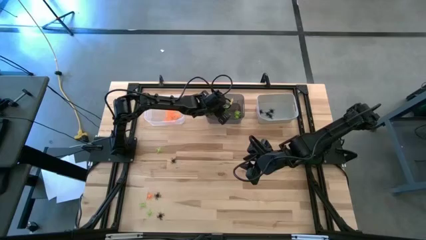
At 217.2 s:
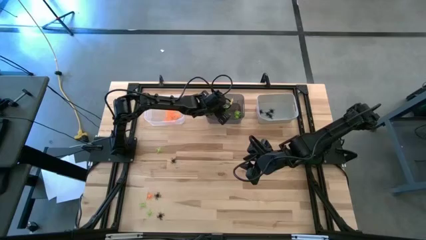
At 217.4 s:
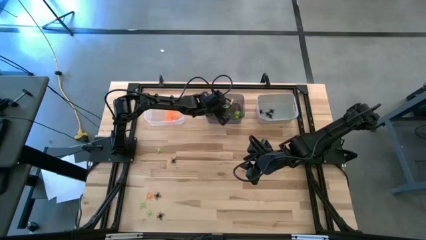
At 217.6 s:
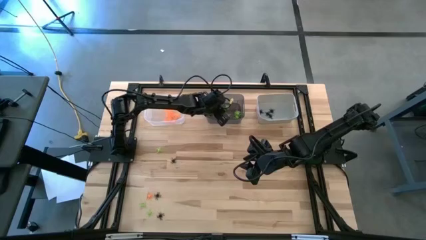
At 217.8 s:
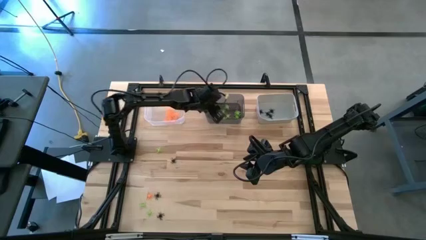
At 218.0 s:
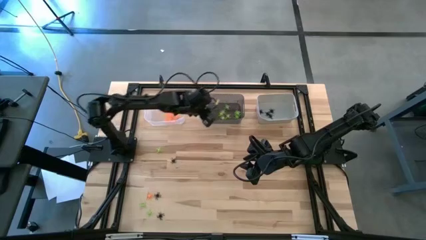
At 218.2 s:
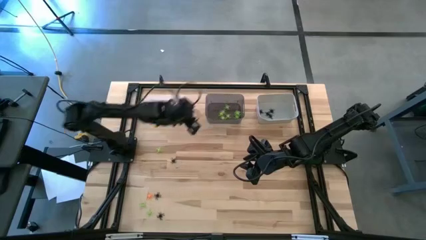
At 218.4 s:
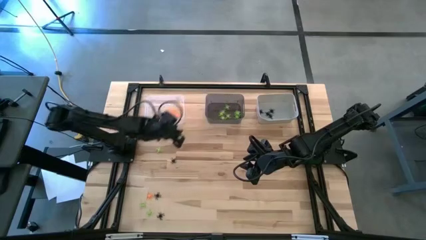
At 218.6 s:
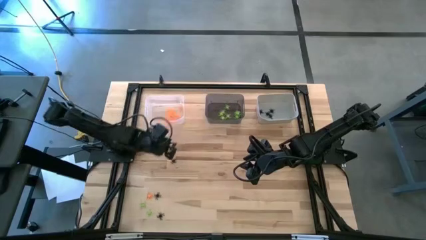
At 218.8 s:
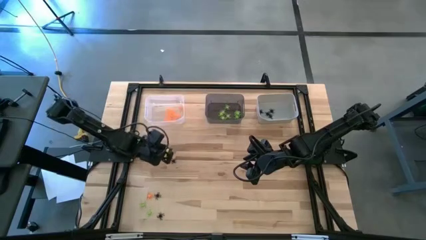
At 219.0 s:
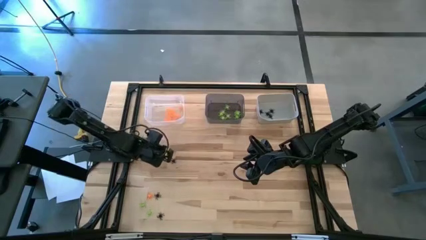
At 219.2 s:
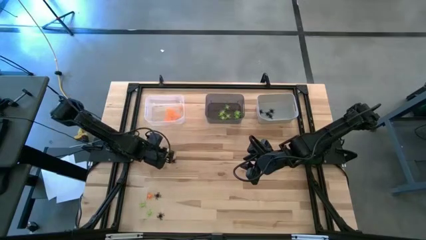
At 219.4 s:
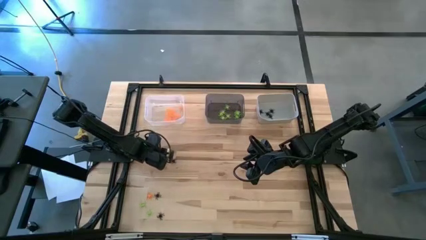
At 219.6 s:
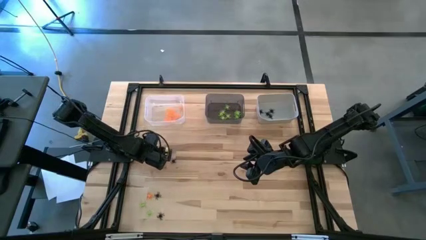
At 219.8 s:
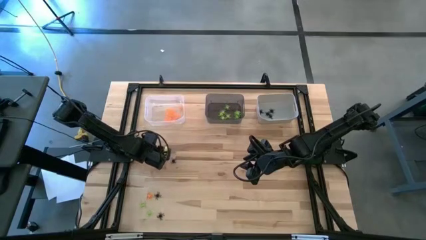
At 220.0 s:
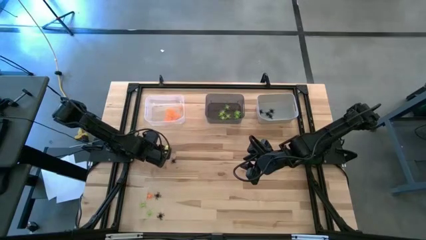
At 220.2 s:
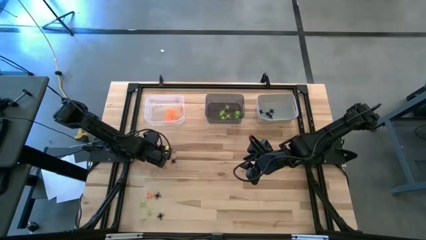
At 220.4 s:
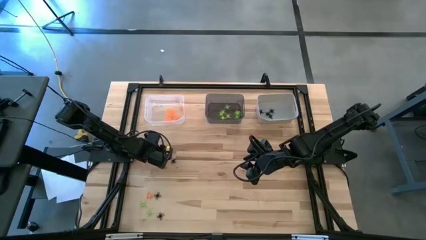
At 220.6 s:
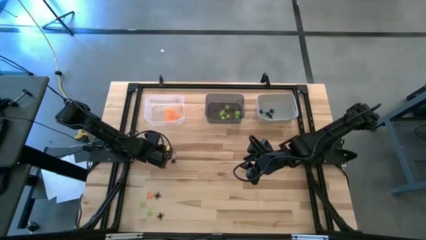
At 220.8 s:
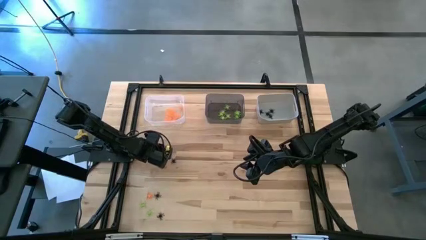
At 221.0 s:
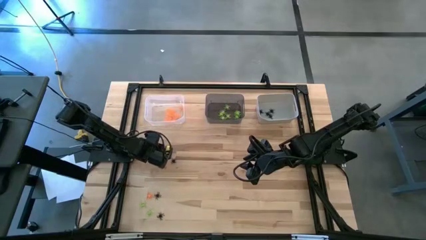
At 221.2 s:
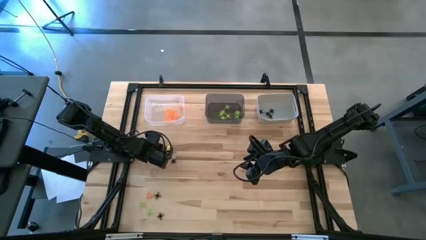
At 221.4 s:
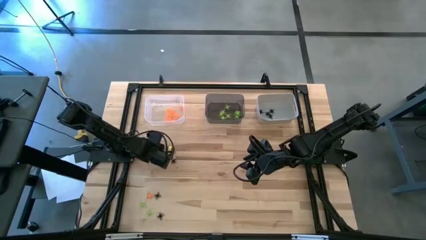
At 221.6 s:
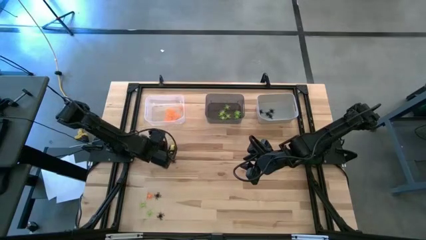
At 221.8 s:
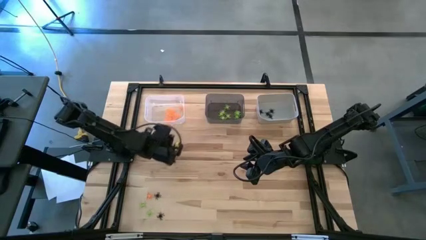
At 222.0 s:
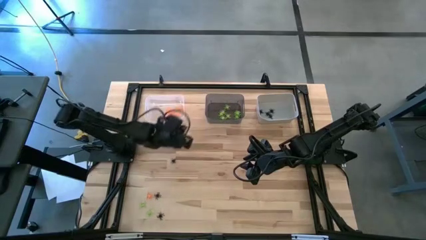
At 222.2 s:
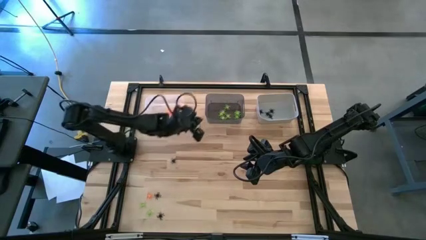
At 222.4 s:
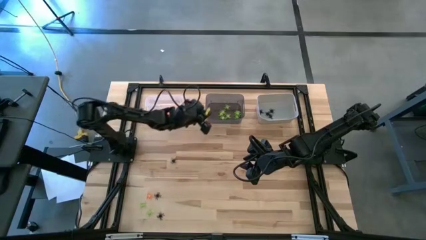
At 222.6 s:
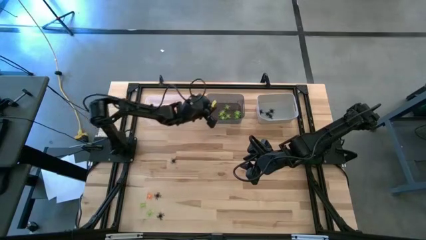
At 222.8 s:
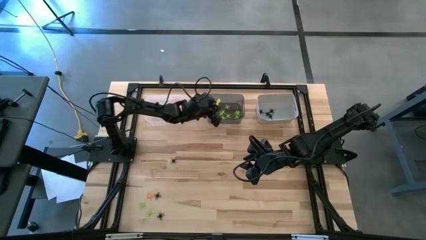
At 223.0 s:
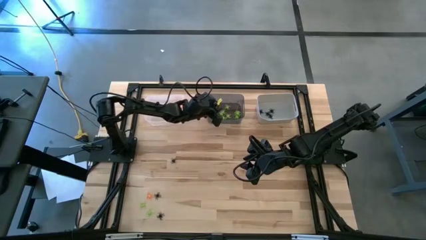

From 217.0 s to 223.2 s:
Task: Sort Halloween decoration
Put the green spider toy into the black transparent bin

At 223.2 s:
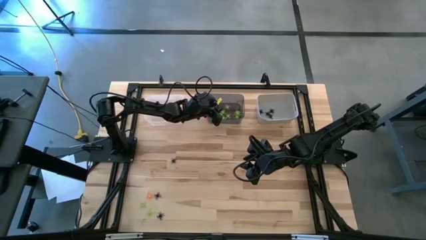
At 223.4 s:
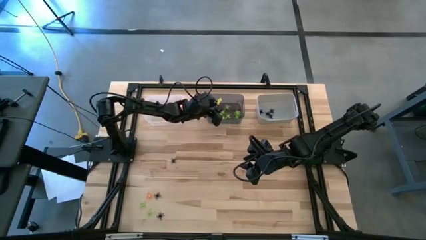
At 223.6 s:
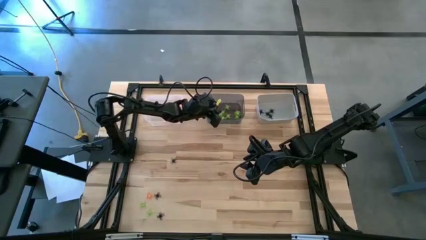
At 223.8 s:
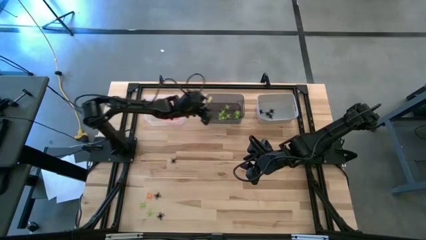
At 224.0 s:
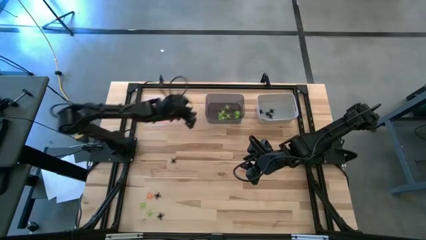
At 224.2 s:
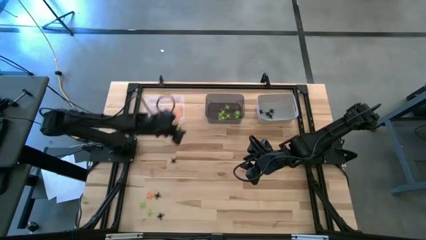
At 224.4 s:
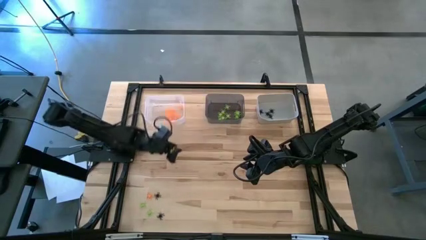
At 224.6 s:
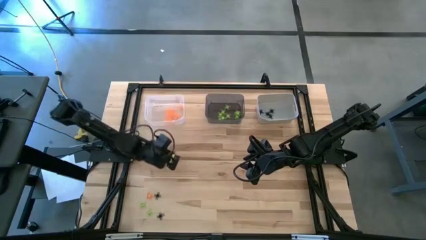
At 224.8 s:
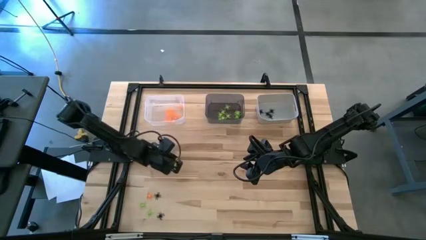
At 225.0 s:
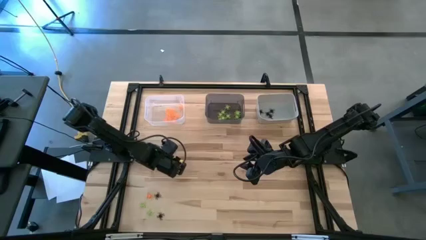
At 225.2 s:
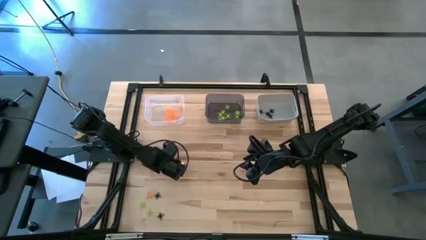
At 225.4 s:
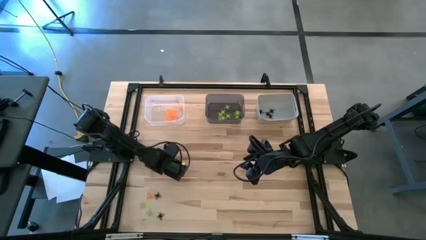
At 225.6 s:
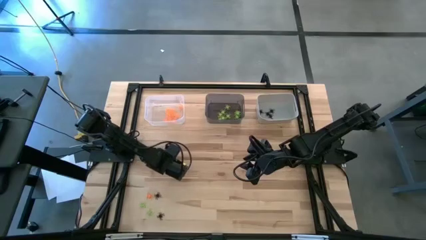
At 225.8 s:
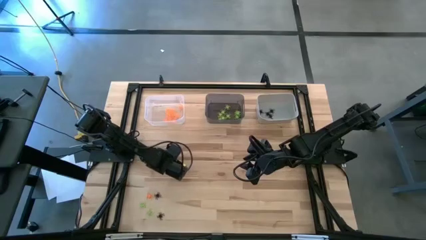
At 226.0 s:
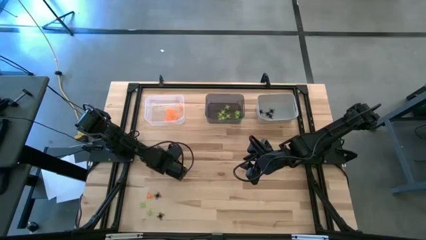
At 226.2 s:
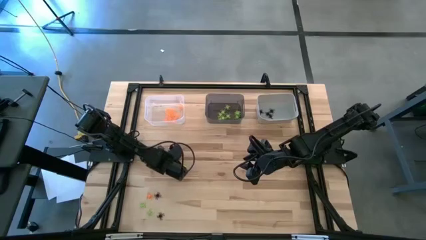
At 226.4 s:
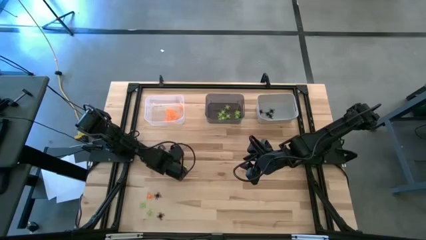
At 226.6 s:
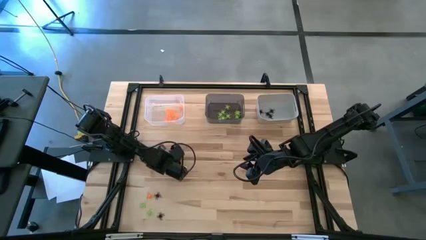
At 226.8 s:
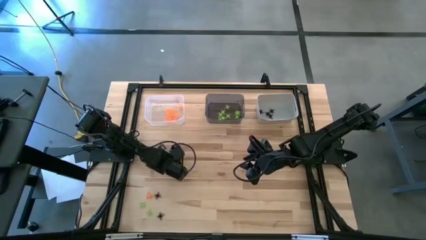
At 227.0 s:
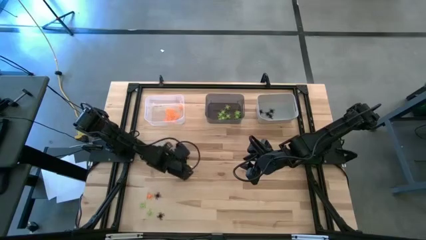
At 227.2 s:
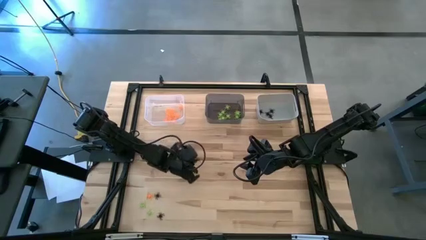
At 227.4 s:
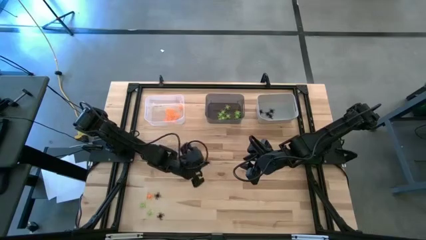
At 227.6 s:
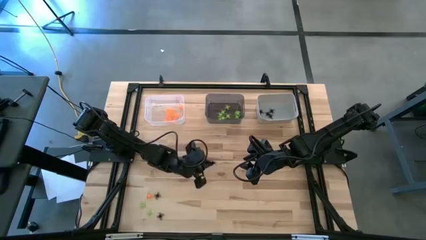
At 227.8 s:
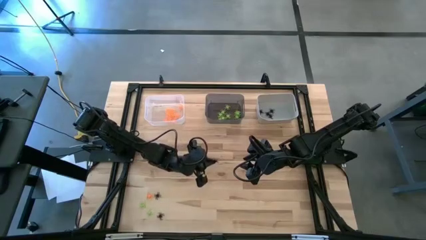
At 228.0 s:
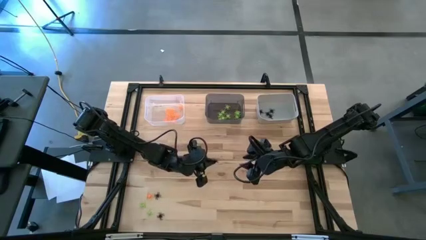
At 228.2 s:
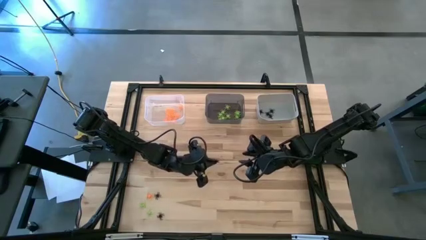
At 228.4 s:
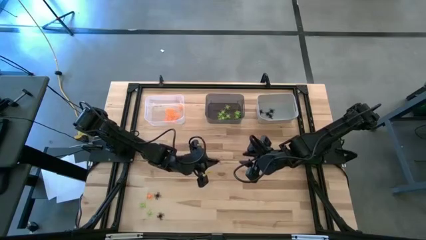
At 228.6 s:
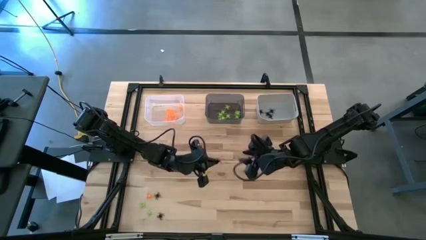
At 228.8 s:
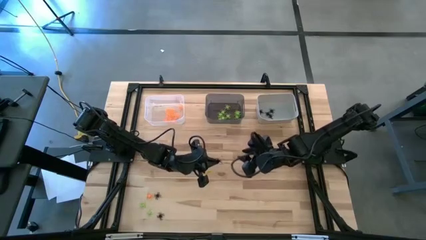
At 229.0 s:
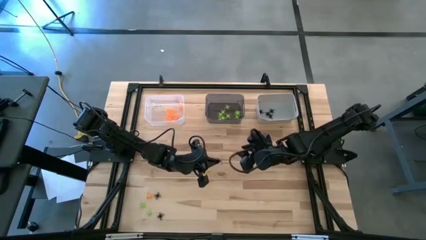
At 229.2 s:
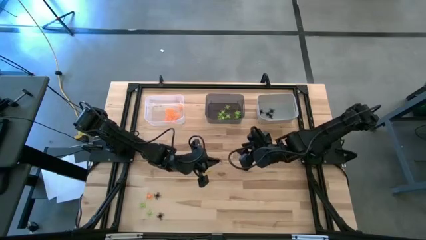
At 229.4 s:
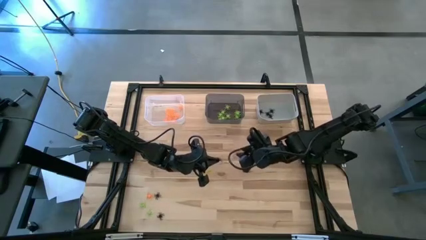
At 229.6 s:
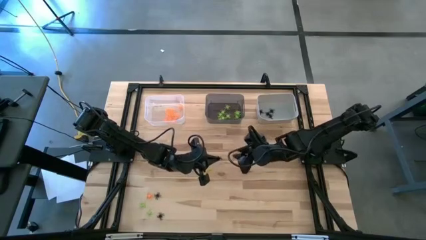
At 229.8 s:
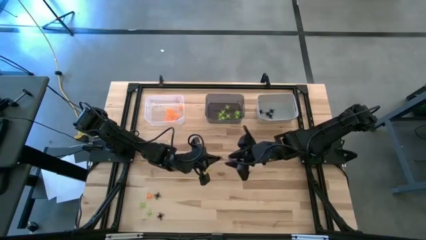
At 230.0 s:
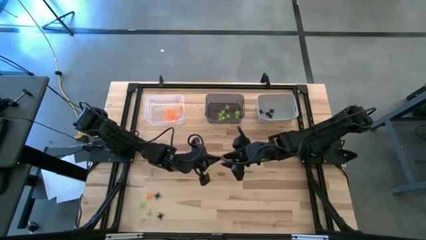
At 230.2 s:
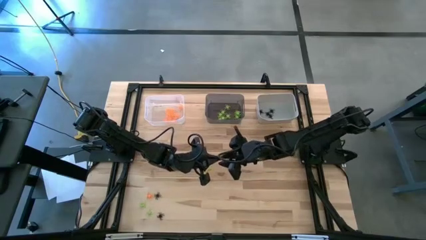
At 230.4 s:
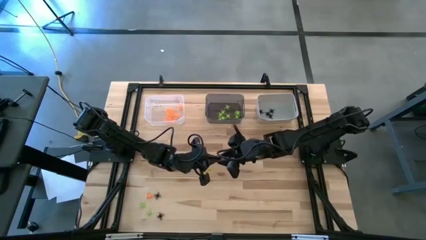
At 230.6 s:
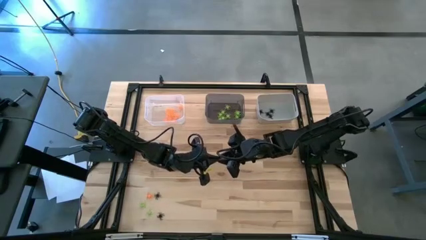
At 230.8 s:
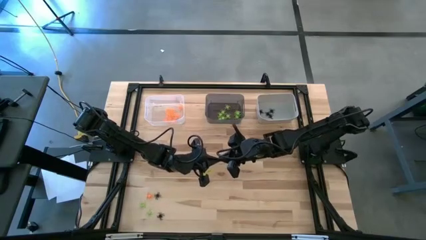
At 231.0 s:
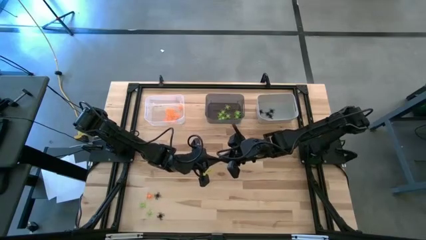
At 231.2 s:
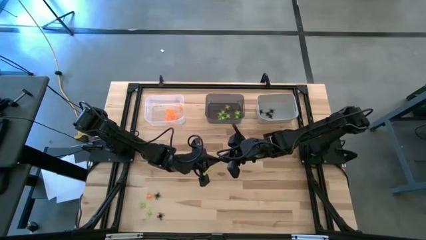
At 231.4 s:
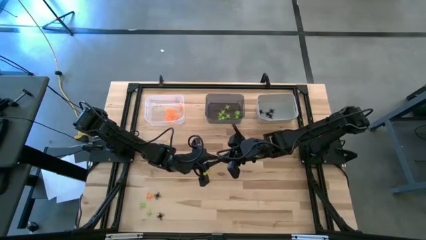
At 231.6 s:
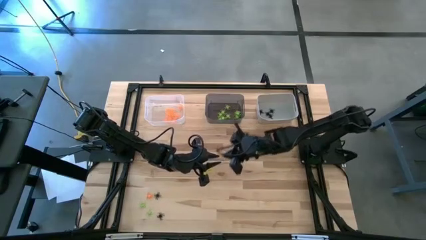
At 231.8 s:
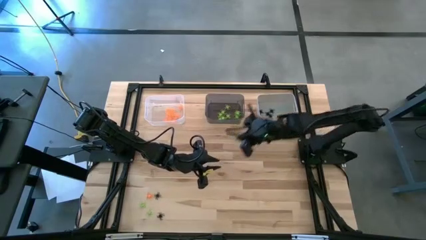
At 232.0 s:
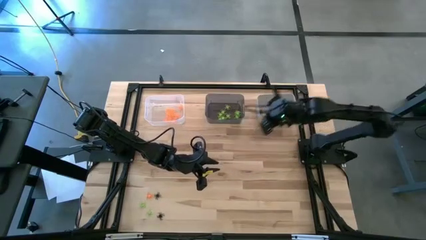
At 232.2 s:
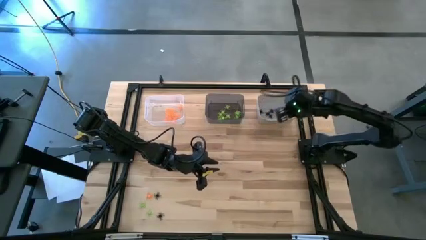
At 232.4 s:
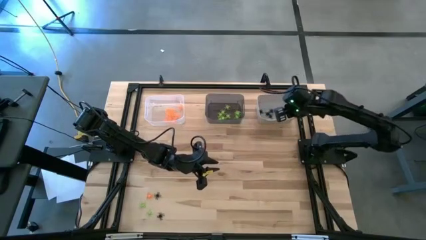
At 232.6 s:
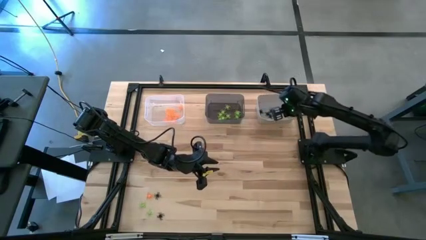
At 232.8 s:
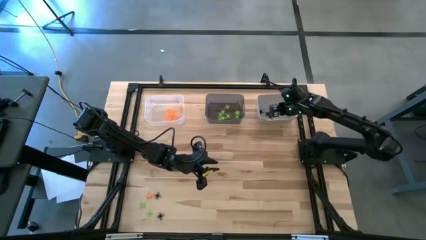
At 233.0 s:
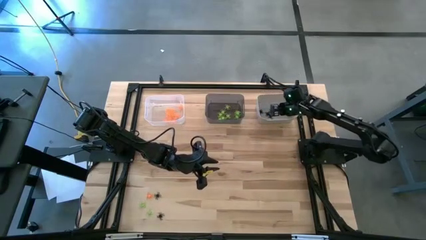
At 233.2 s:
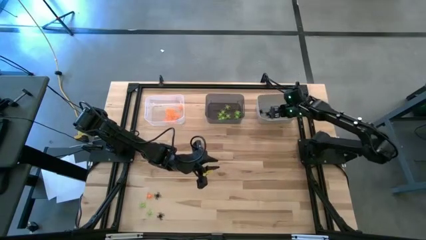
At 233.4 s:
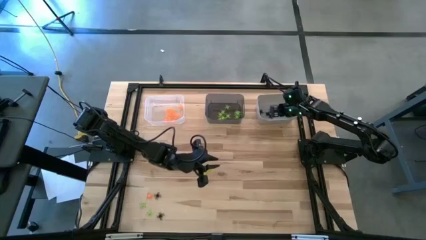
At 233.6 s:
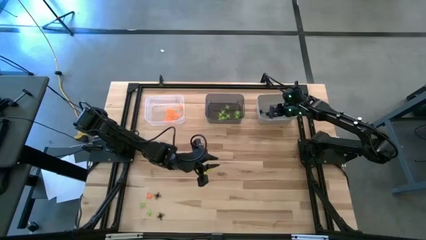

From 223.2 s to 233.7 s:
Put the black spider toy into the white bin
